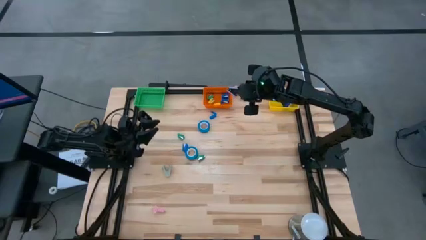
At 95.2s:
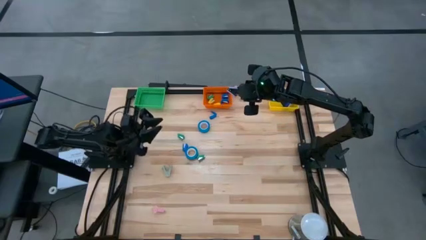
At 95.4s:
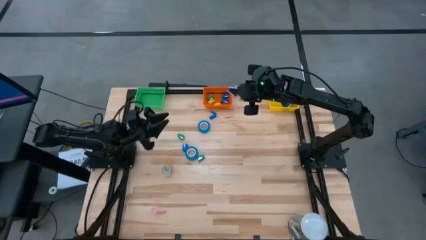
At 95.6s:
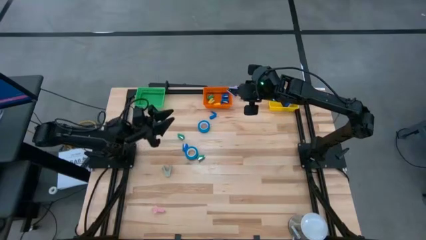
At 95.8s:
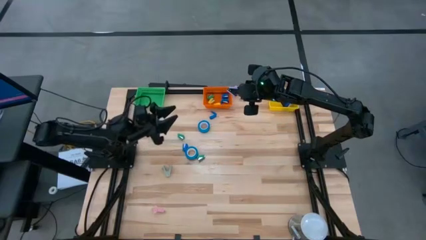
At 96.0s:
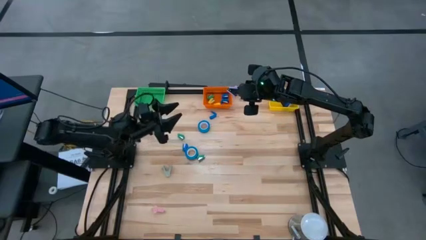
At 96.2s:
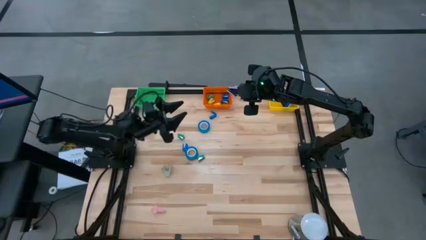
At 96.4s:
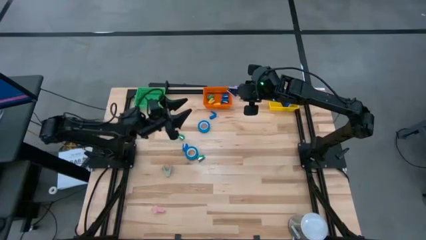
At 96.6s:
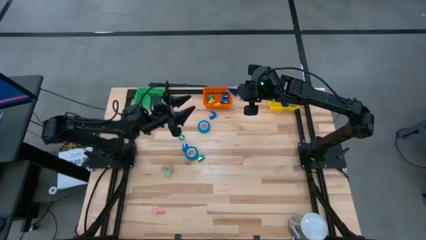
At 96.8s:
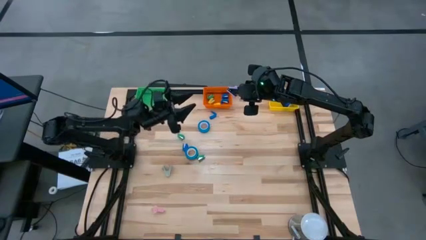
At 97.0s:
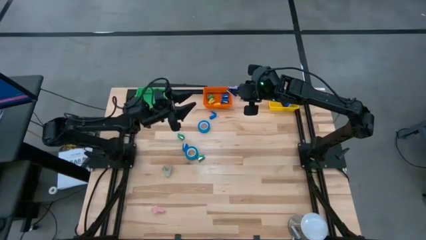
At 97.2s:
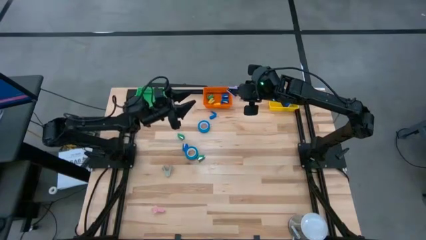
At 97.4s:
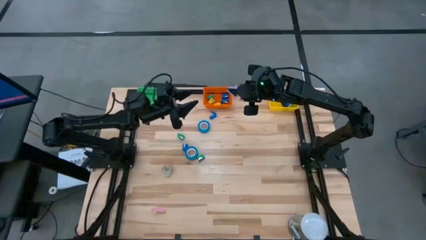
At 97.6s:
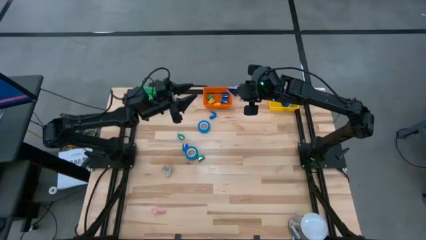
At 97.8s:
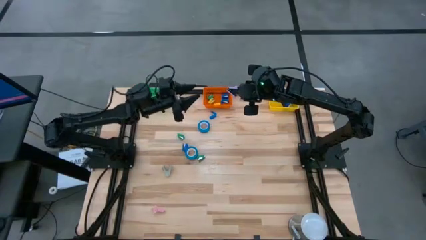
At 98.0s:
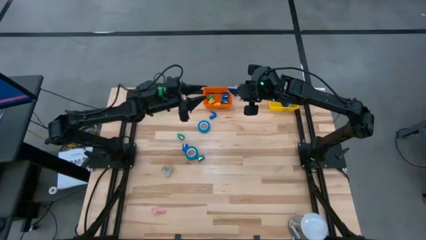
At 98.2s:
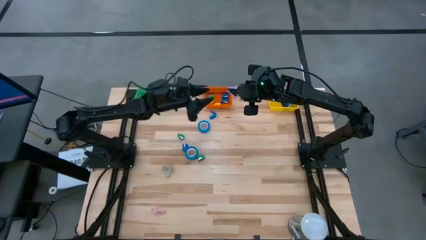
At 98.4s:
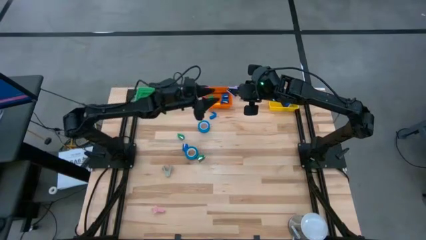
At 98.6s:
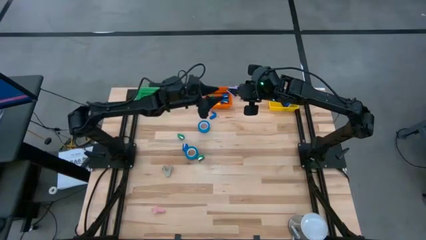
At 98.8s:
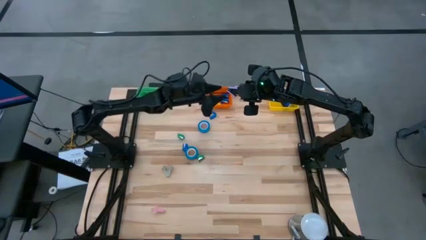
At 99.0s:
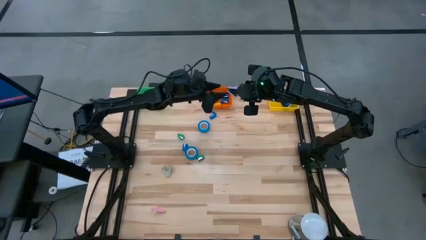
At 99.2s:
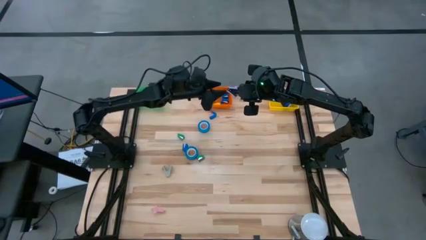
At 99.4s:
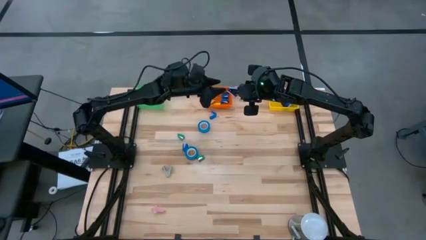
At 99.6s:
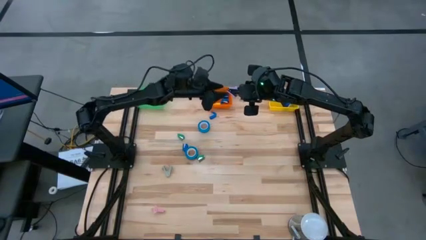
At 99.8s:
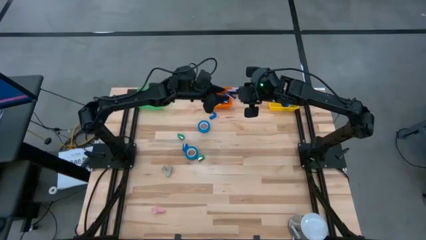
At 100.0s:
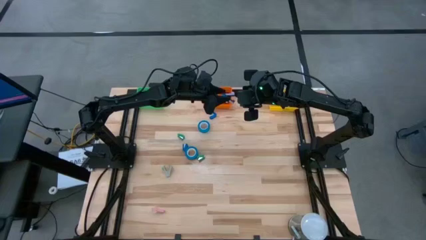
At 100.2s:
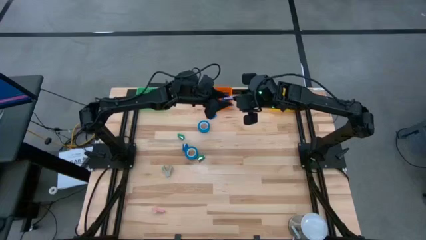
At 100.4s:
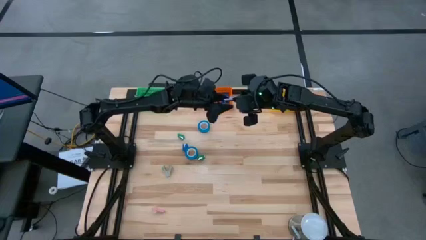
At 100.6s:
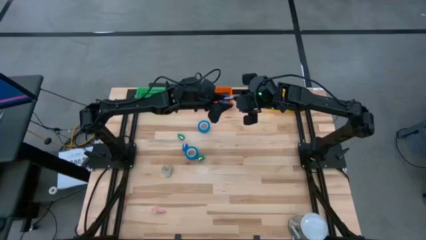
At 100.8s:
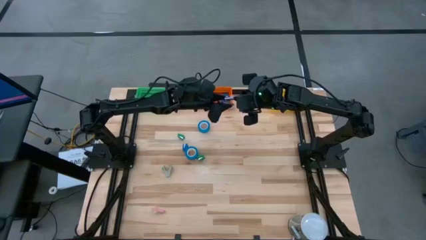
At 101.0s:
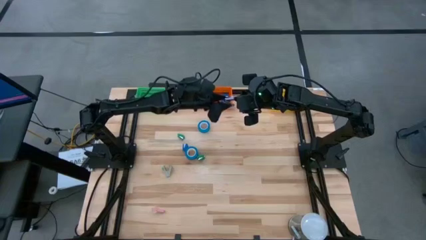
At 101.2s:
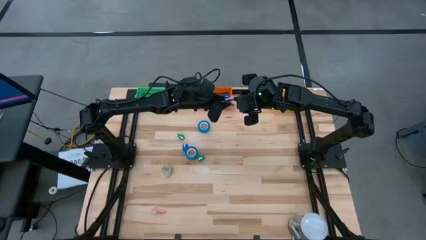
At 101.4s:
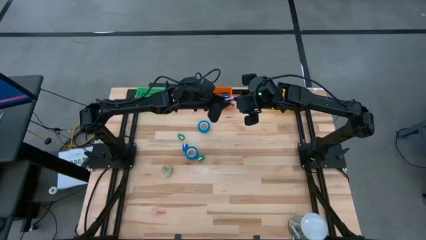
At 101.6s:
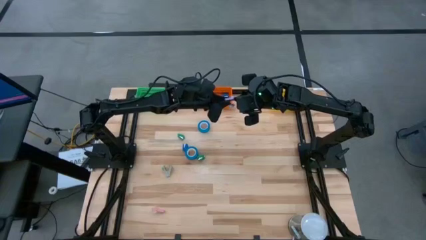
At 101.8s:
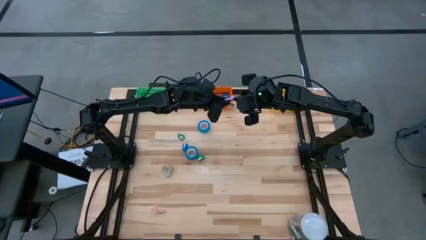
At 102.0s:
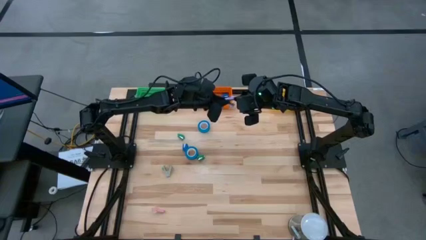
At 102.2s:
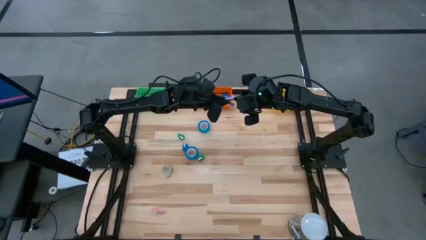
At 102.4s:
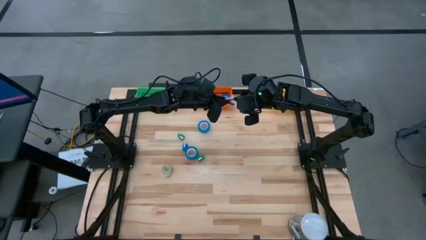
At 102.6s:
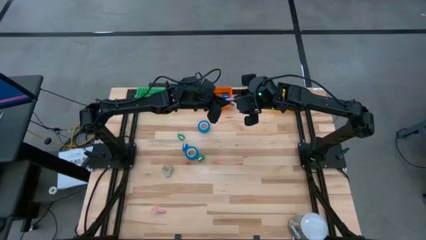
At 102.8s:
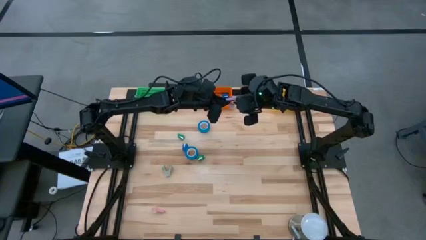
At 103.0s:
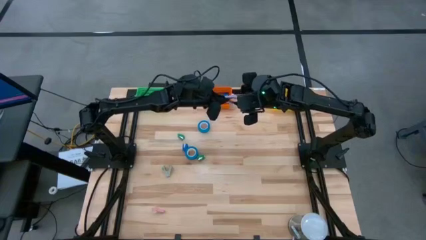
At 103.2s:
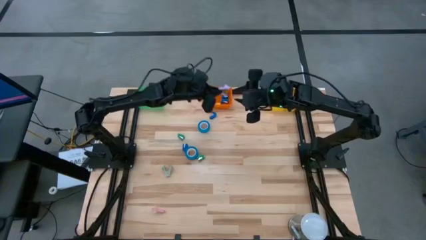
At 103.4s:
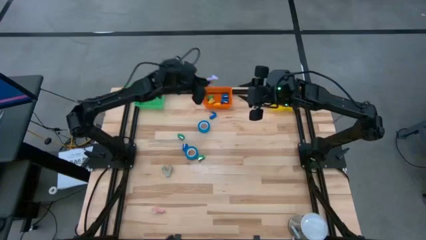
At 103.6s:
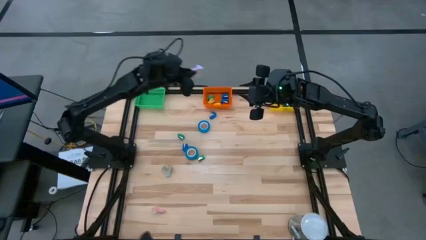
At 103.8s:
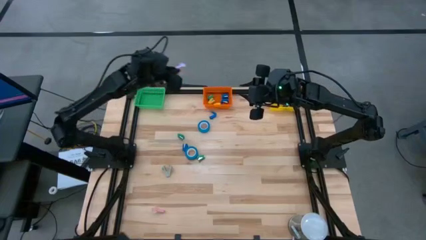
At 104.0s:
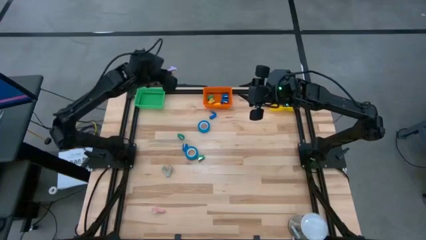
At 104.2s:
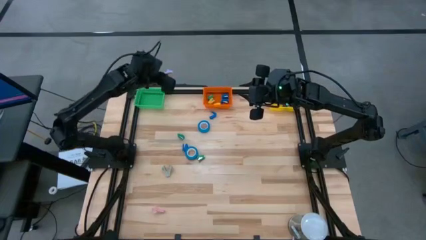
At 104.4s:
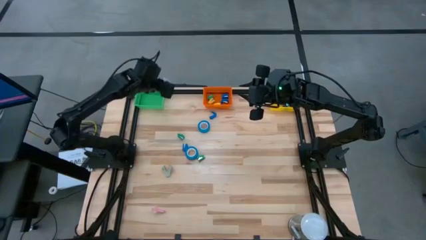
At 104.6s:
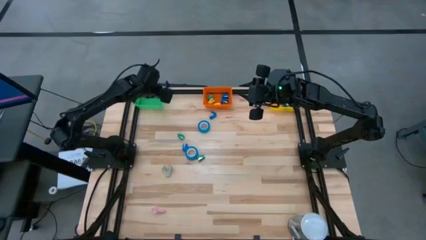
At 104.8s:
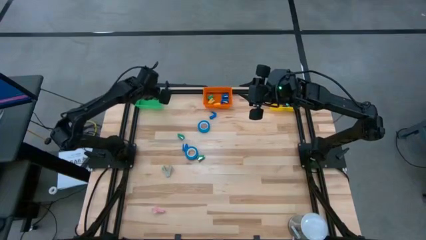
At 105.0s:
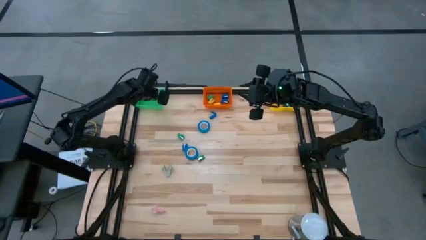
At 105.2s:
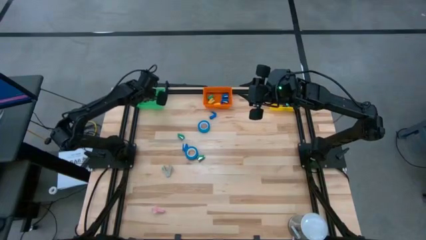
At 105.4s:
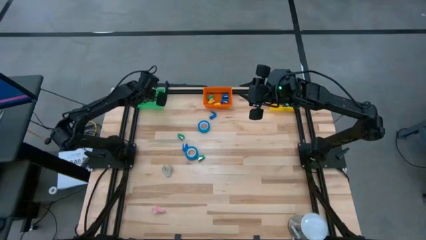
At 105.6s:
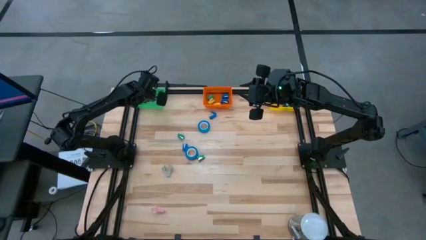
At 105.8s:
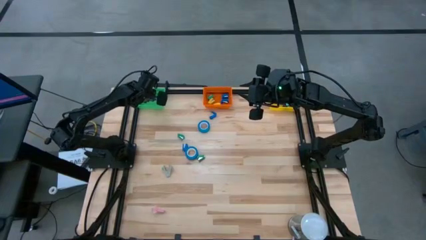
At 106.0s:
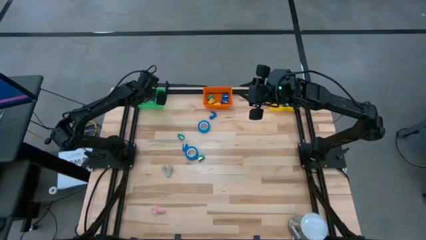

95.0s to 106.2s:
Task: Pick and place Stapler, Stapler remover, tape
Put the purple staple remover into the green bin

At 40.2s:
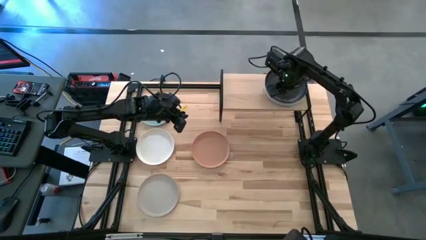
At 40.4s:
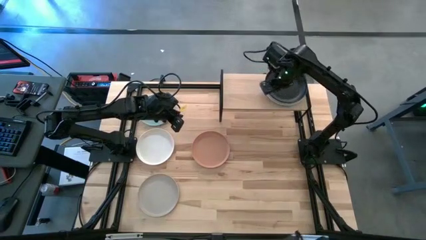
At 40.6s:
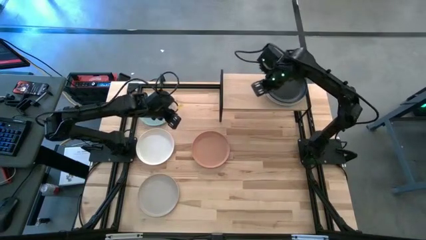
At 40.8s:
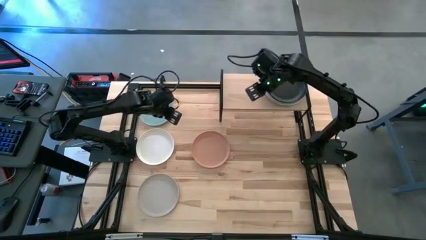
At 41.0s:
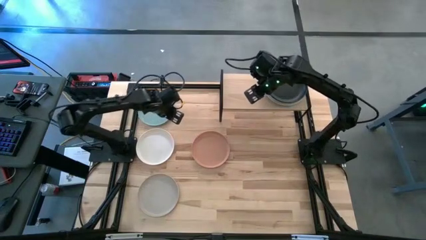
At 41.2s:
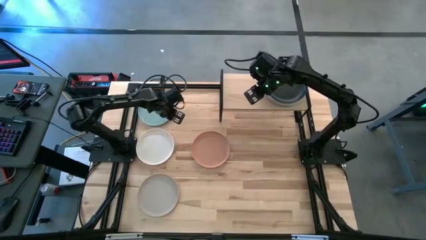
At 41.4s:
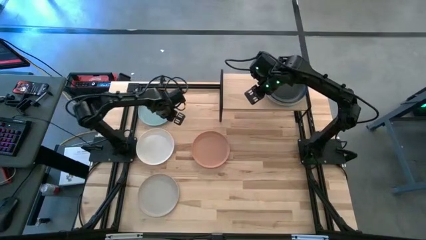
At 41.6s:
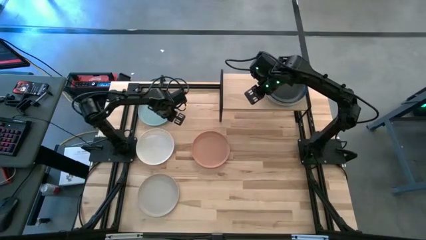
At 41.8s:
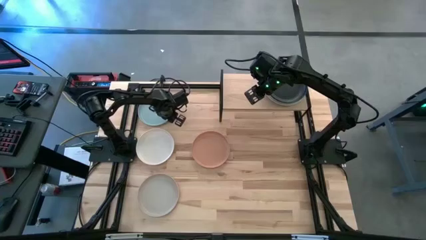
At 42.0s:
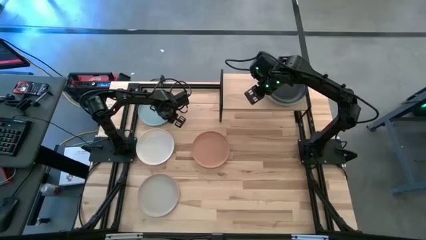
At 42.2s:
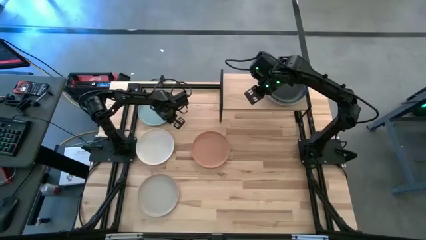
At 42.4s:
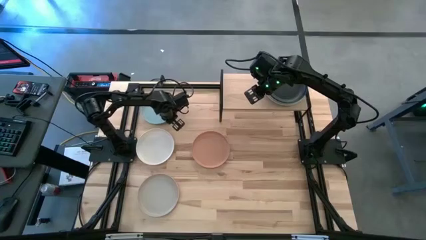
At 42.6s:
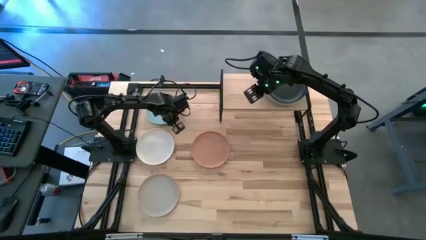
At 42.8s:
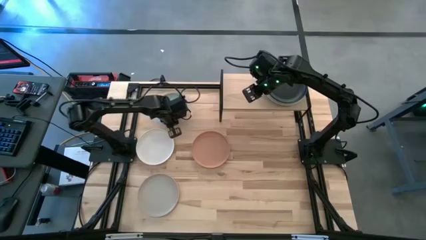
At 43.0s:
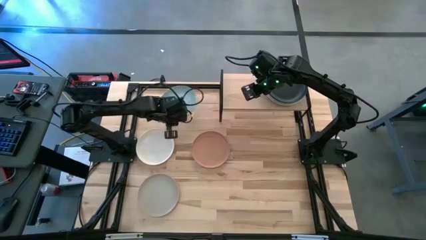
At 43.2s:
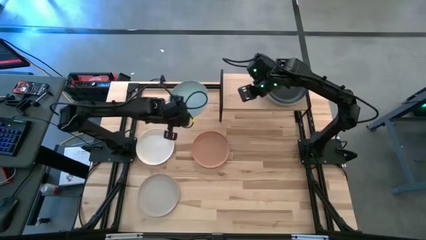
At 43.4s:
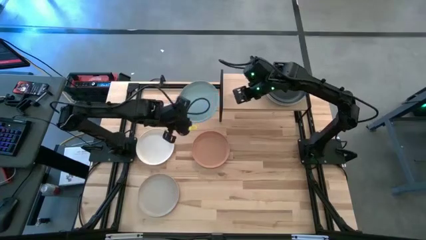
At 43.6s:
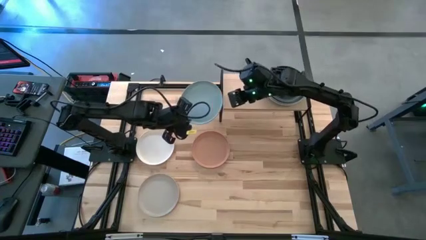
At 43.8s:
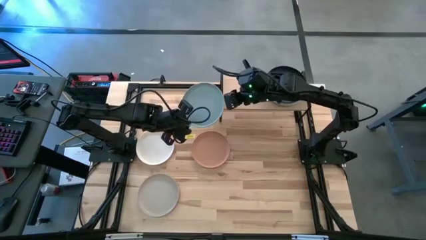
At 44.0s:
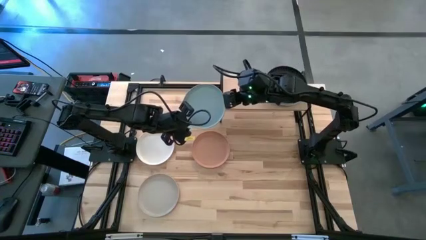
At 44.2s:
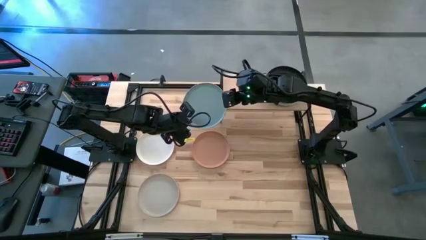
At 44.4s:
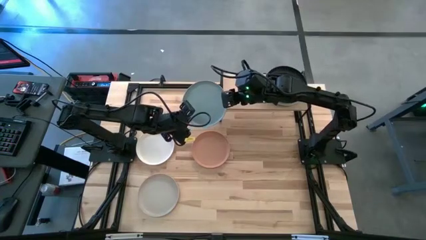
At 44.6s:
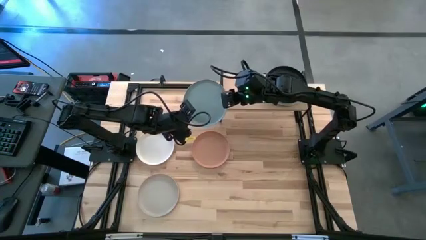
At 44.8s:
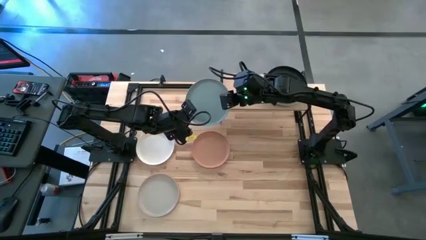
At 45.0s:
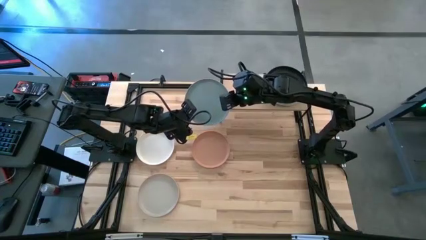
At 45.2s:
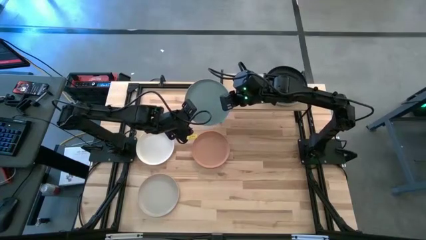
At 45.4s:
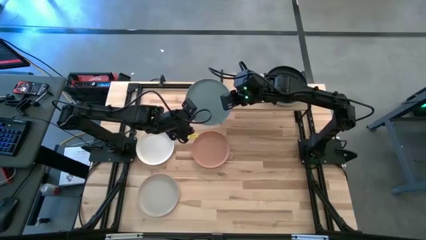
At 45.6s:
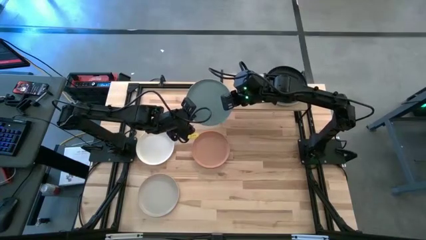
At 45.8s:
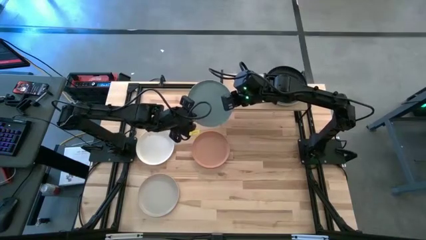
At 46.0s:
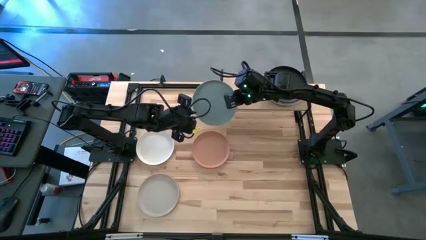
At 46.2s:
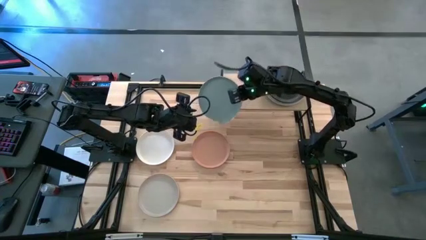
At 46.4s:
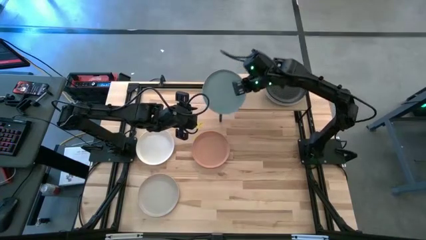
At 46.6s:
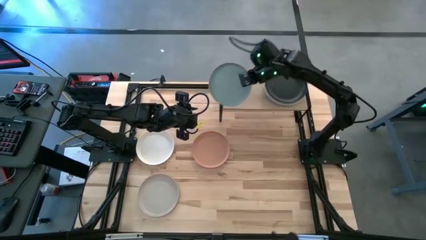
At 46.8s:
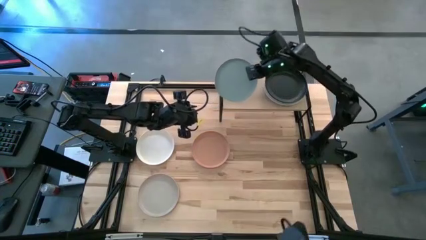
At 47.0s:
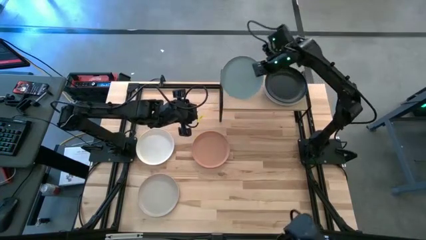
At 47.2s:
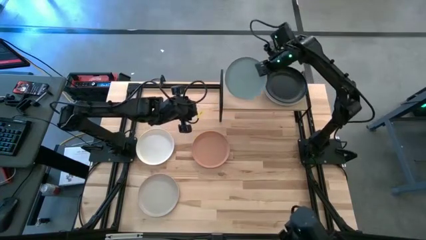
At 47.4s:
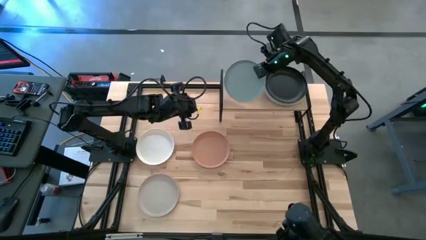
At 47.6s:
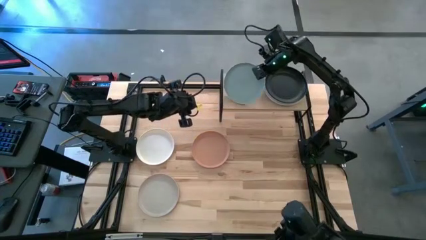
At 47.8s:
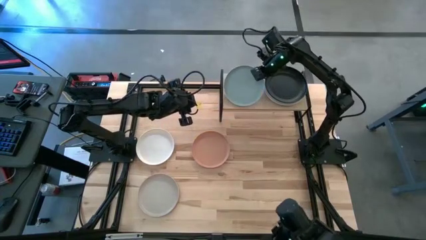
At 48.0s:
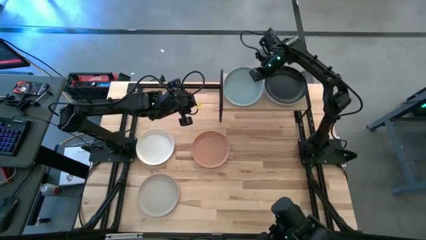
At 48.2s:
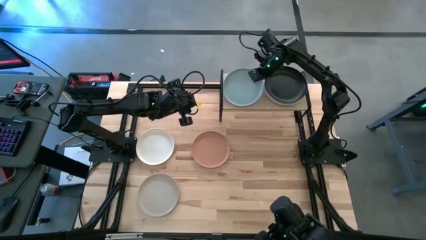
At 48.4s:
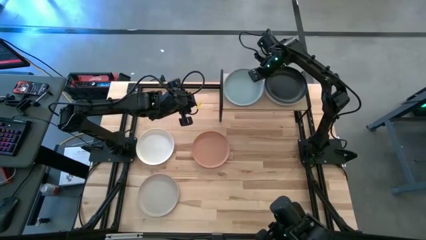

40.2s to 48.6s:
Task: Place and stack plates onto a shelf
Put the blue plate on the shelf
